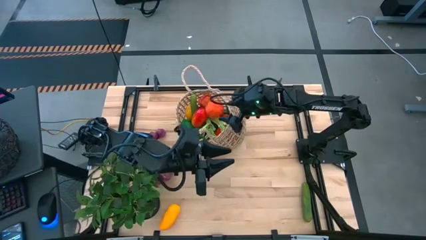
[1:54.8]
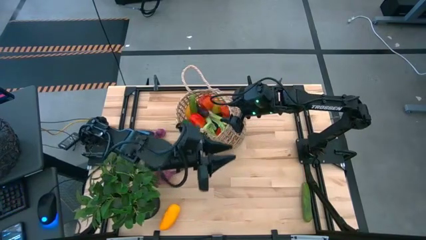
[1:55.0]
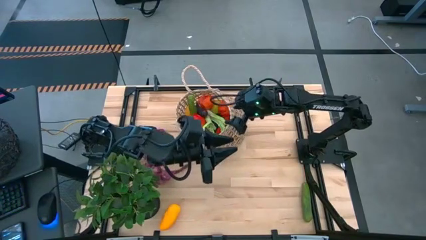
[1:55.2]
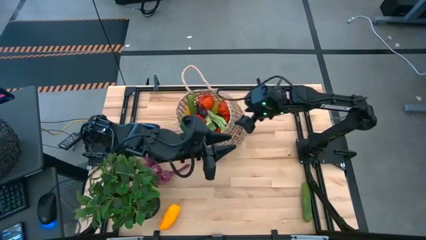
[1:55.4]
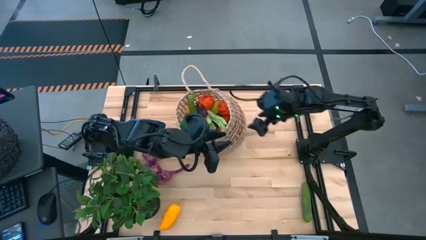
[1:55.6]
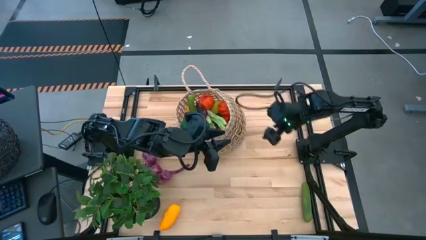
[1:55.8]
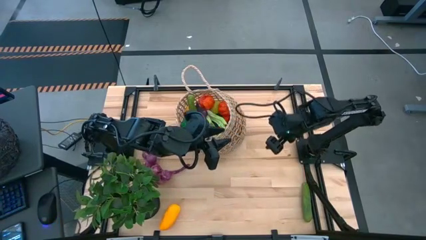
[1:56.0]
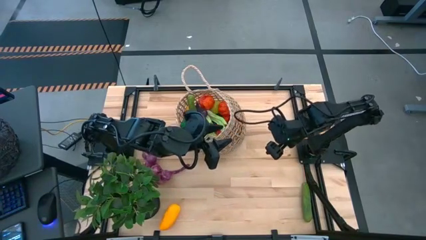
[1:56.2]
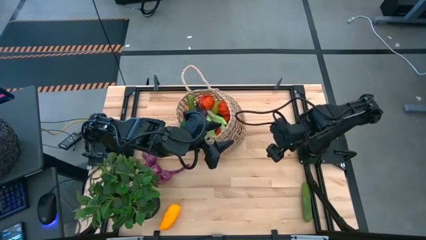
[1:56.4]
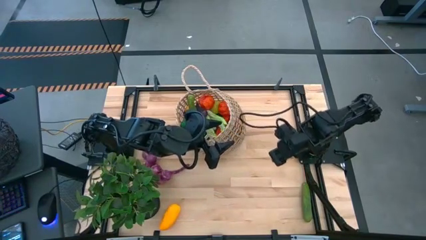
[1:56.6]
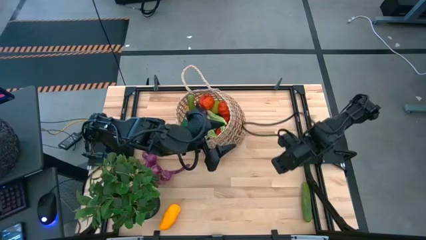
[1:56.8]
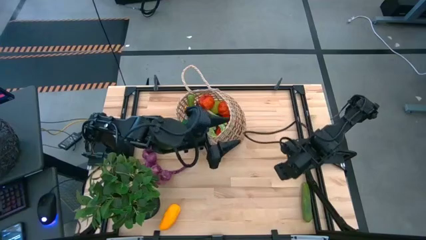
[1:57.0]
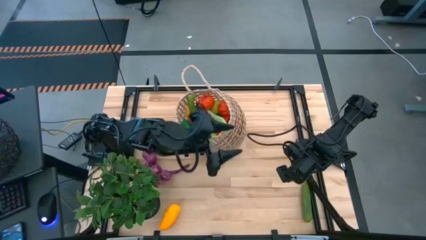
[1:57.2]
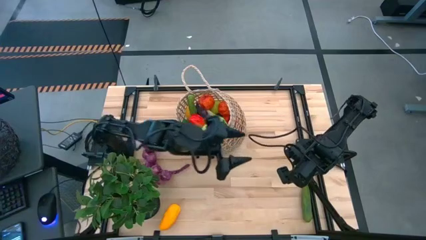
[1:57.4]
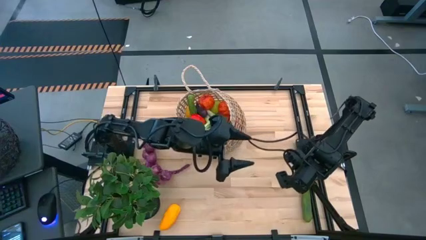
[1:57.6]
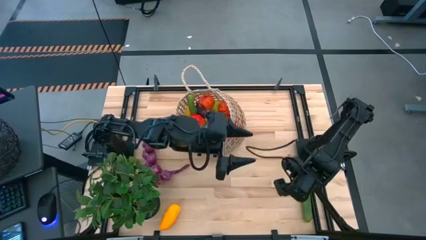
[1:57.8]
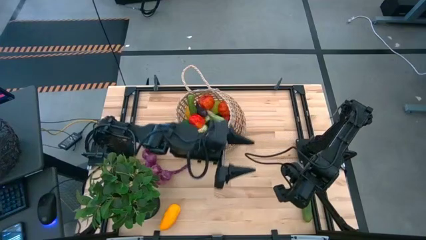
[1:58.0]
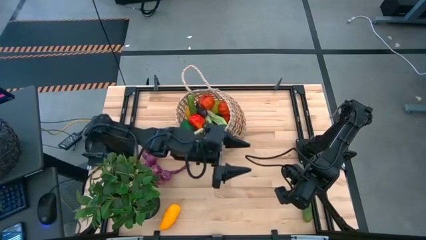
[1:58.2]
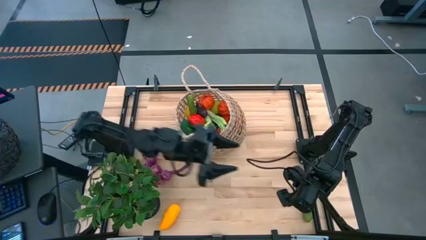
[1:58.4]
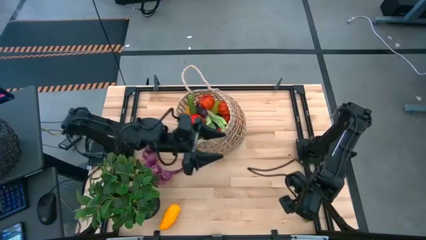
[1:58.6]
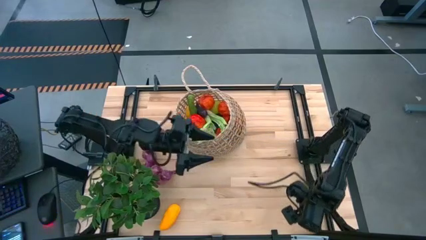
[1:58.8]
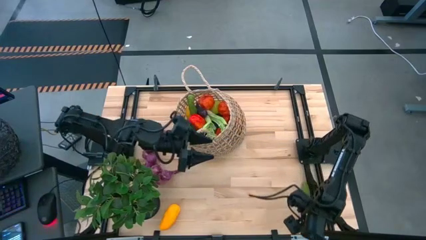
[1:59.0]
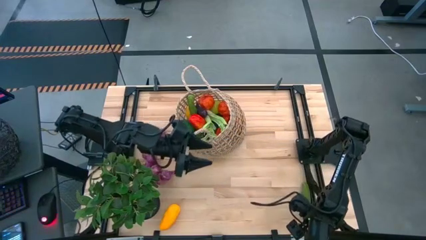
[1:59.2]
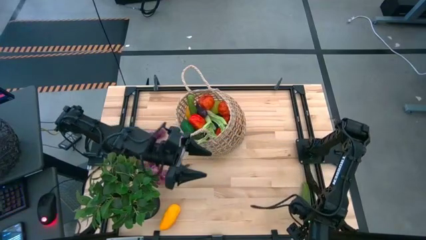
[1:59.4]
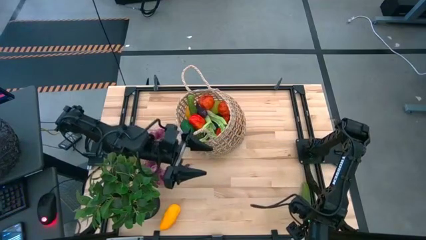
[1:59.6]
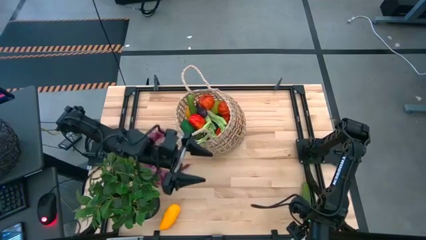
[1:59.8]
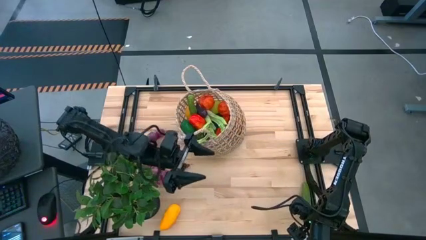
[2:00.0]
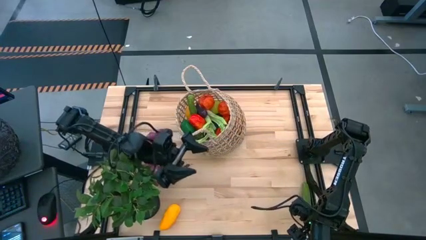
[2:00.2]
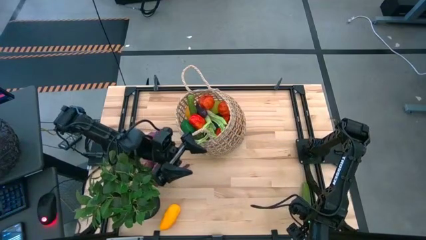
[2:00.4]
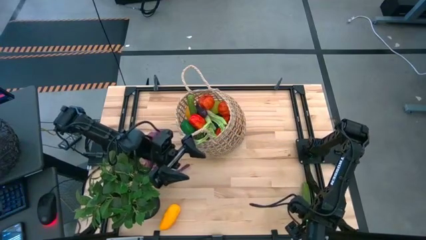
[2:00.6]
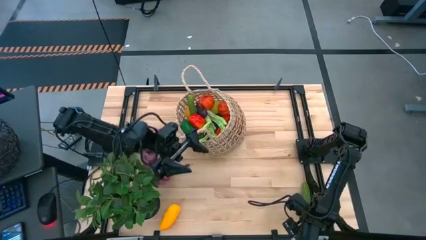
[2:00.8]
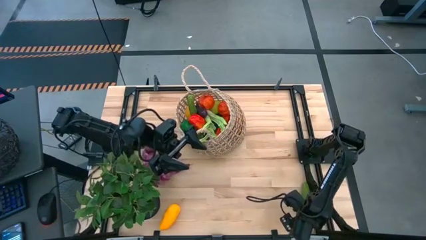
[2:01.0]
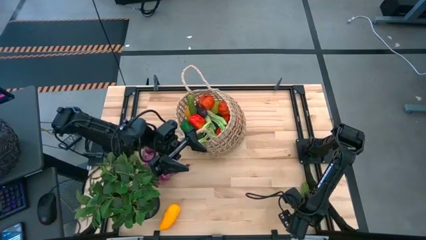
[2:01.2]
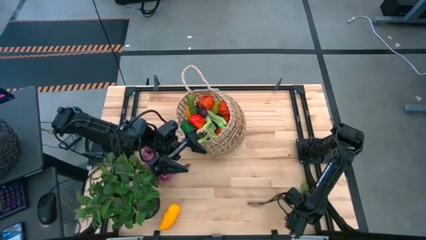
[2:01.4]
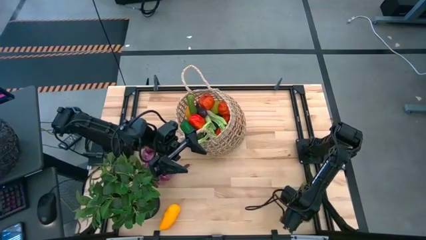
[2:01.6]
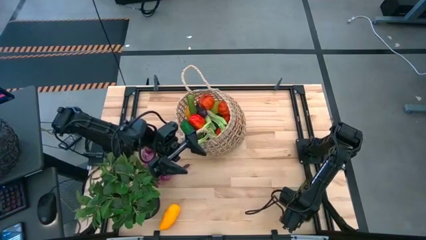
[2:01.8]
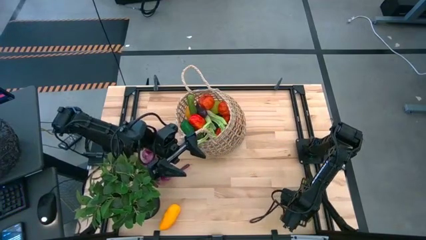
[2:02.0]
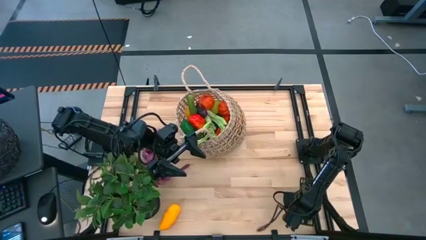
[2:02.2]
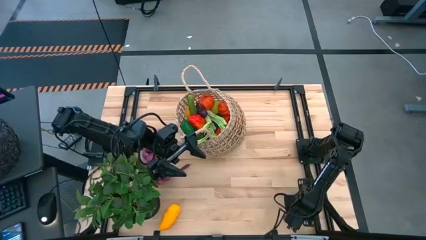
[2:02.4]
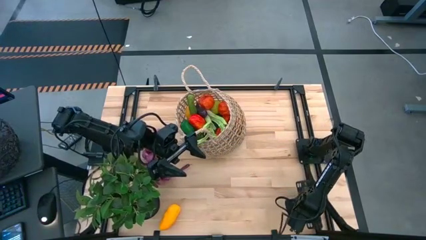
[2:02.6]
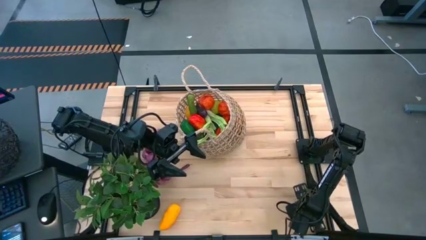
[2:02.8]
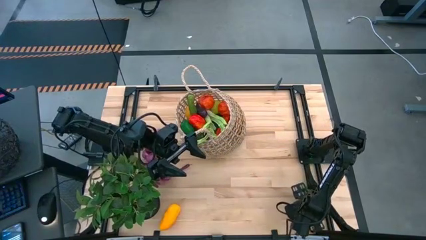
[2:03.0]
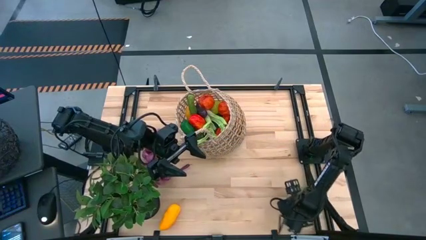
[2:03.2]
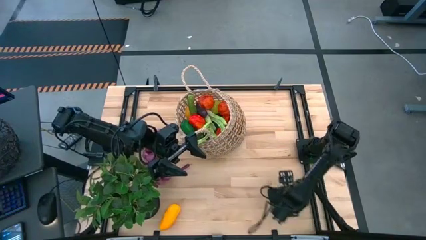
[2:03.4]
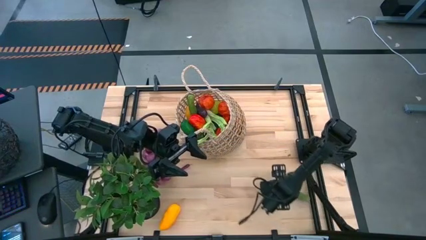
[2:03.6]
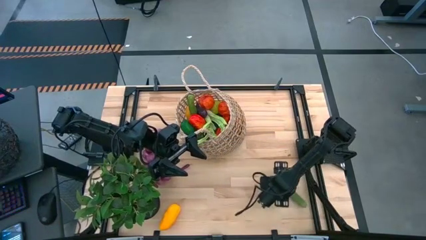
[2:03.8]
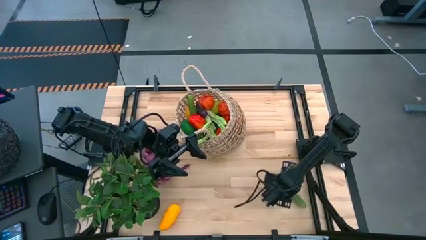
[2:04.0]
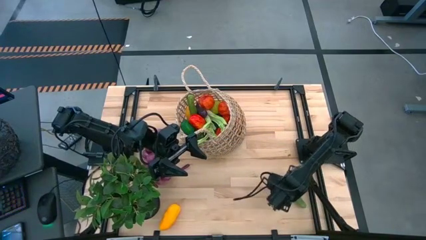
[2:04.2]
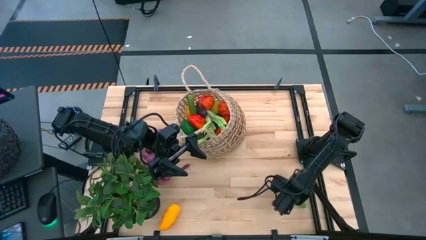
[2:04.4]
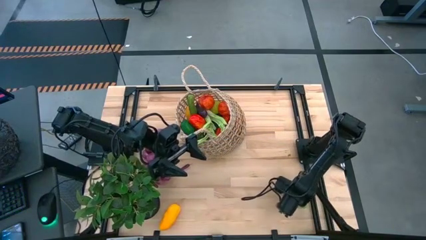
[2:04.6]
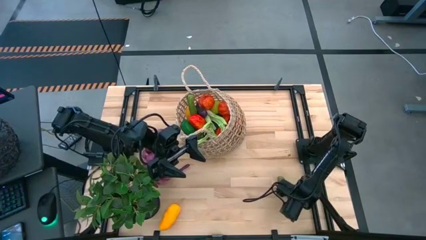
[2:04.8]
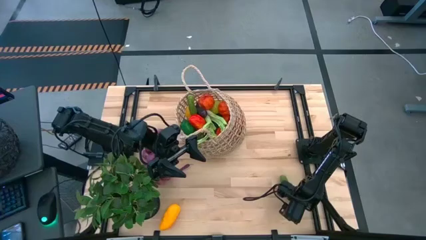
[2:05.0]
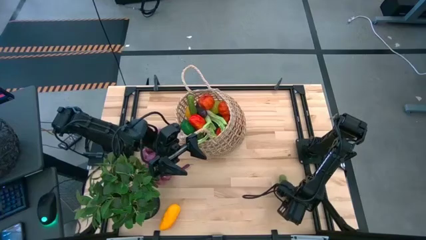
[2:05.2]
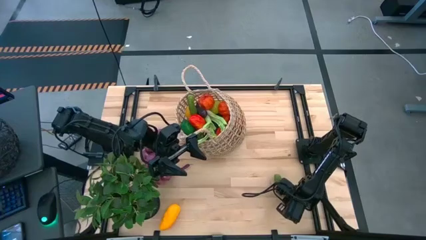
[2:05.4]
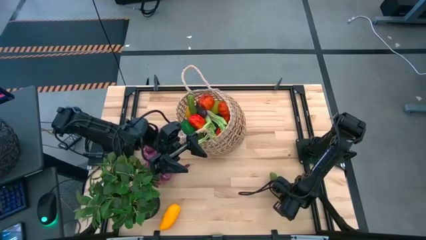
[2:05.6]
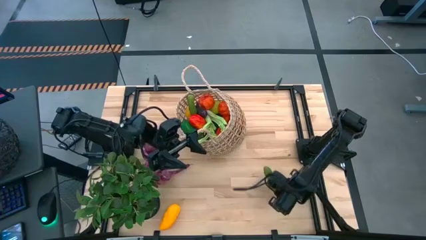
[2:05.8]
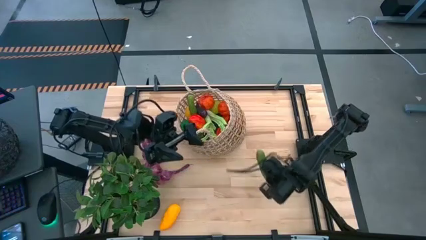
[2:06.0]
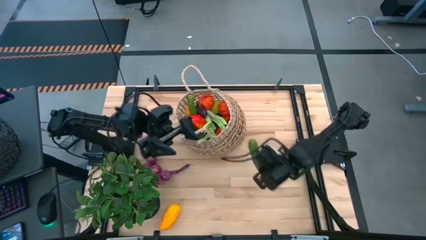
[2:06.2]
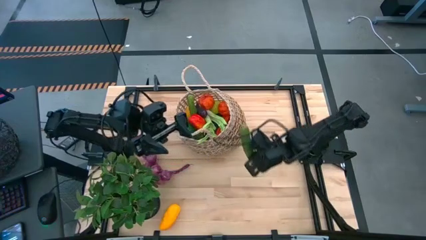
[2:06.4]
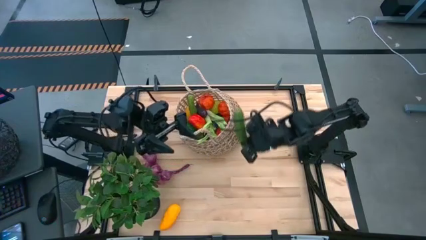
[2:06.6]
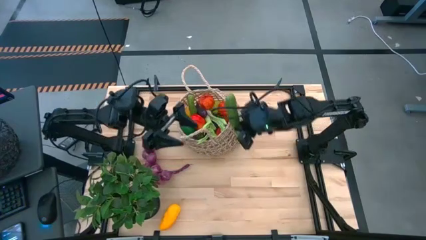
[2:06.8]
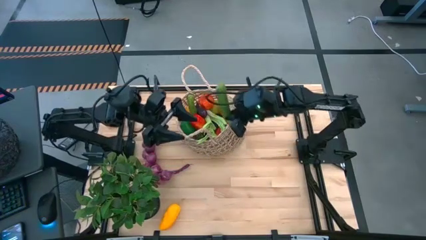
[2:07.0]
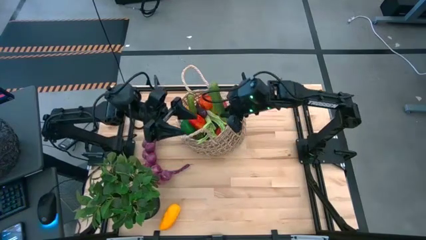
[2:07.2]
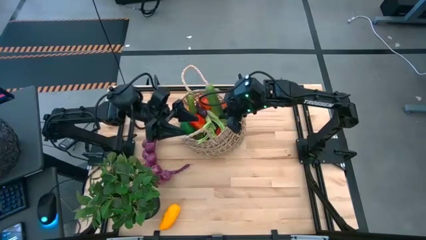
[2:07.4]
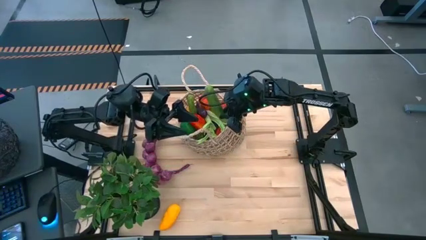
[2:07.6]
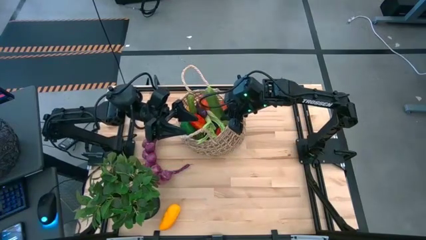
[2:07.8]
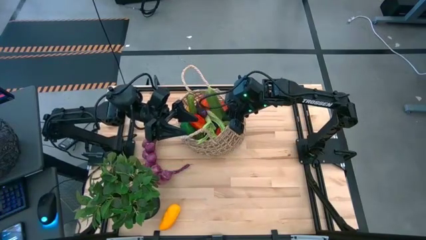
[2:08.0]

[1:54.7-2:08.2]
Task: Build produce basket
Put the cucumber into the brown basket

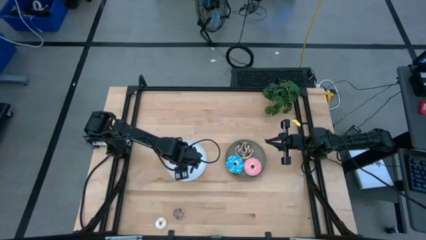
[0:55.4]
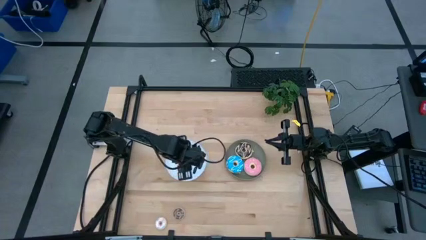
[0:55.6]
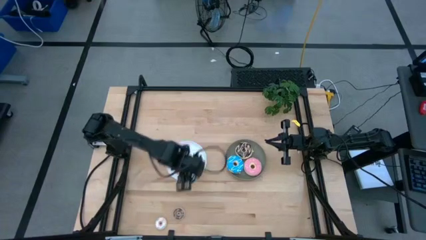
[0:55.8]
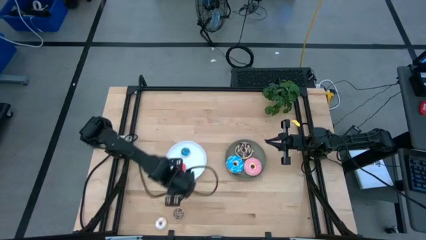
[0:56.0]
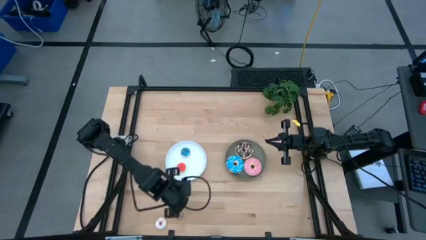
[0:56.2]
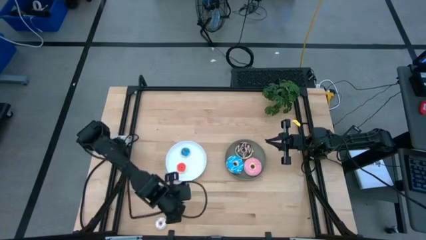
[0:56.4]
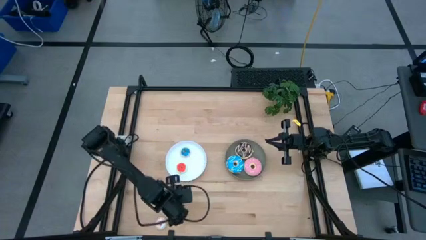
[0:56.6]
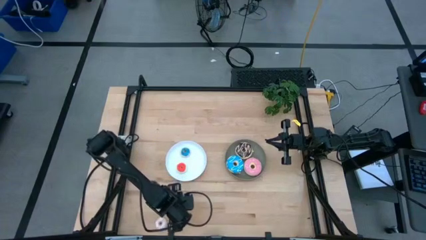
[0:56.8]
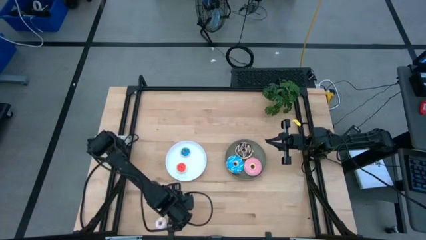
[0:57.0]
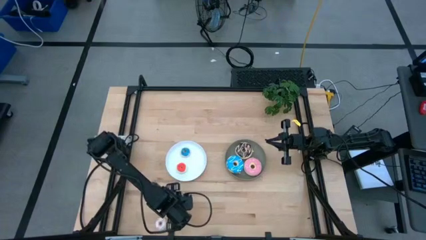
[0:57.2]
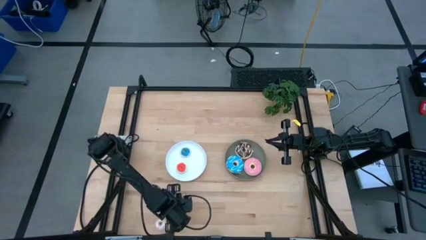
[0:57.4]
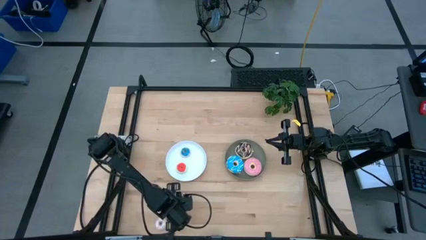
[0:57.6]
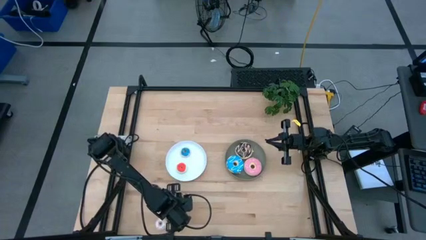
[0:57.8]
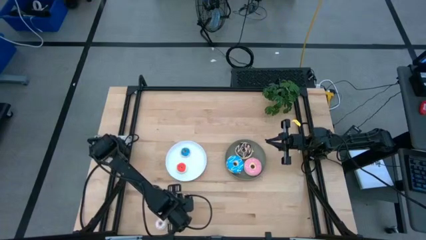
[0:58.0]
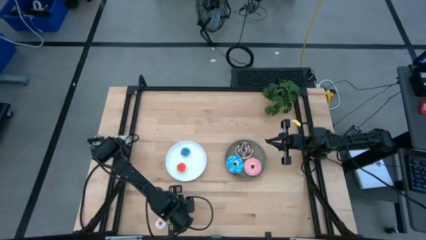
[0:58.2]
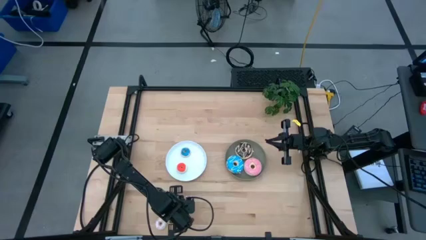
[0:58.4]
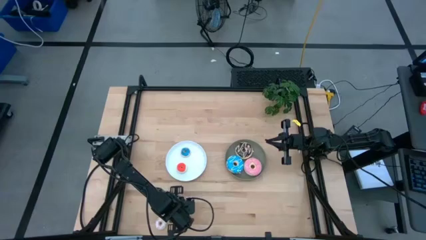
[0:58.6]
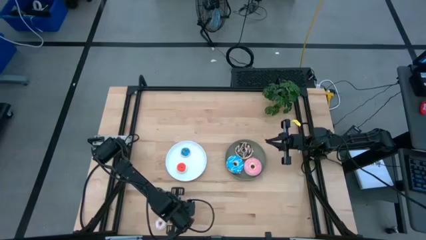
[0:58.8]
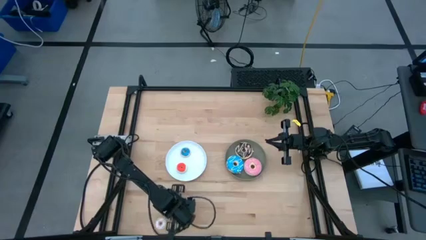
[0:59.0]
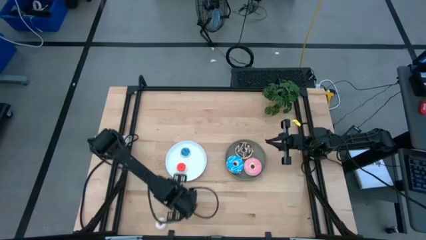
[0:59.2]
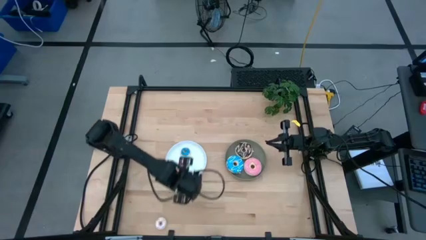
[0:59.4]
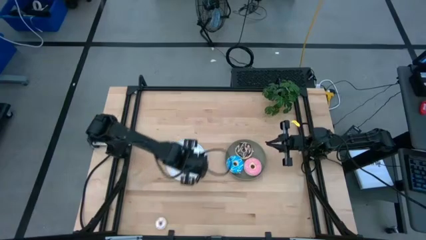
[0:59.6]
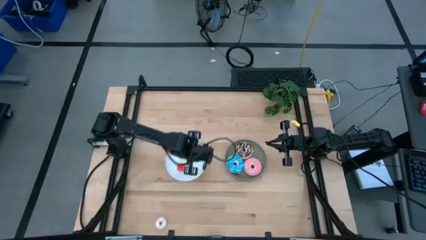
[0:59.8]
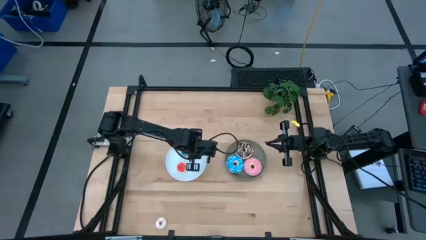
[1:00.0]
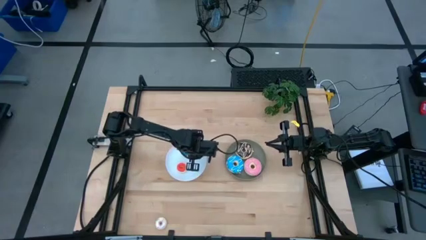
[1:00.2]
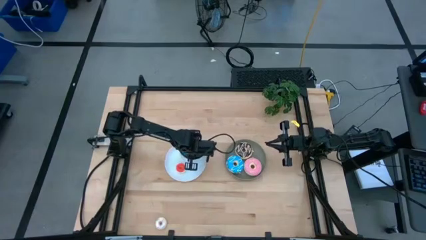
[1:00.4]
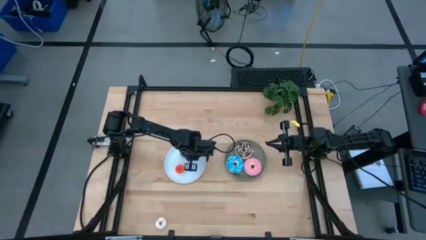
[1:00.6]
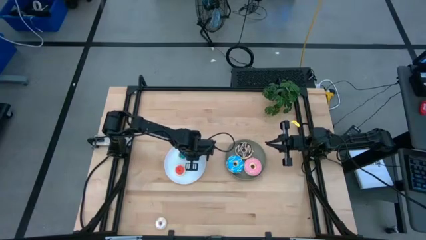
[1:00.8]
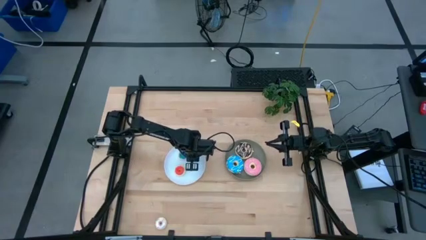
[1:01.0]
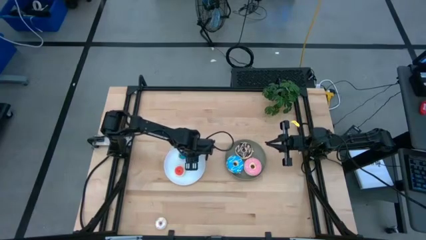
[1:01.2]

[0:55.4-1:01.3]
Task: Pick & Place donuts
Put the small brown donut on the white plate
